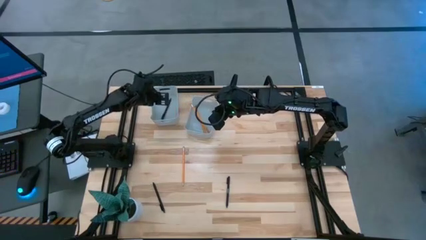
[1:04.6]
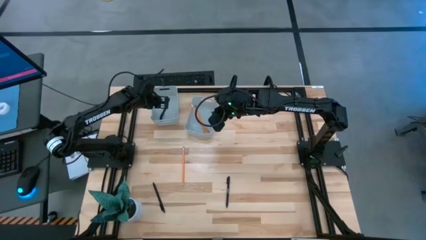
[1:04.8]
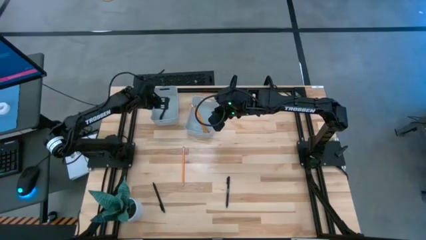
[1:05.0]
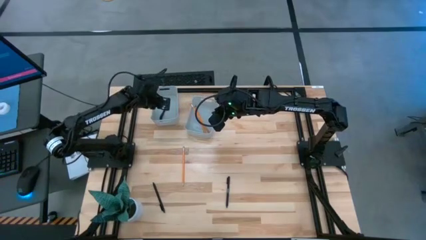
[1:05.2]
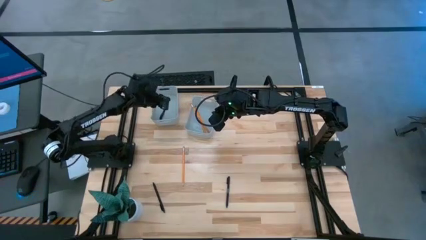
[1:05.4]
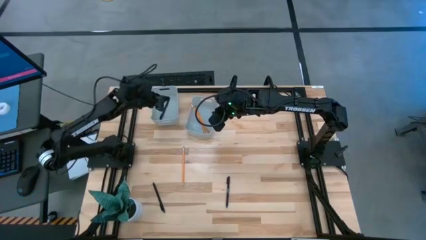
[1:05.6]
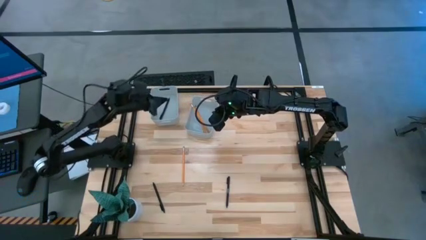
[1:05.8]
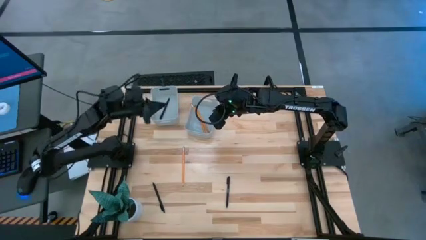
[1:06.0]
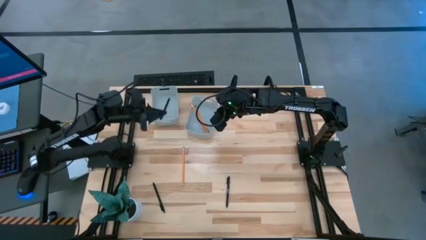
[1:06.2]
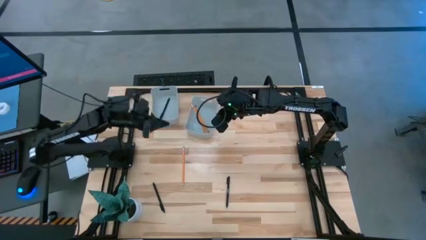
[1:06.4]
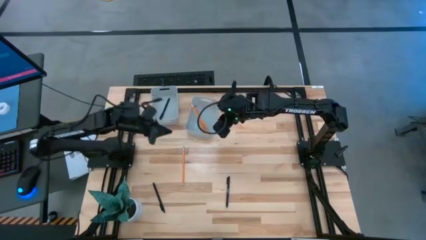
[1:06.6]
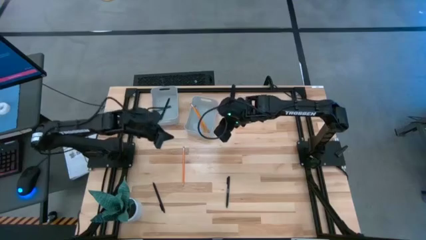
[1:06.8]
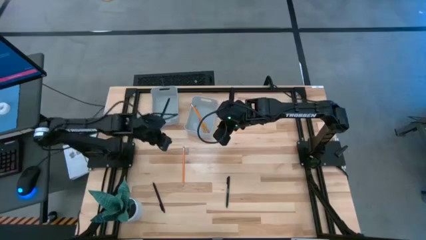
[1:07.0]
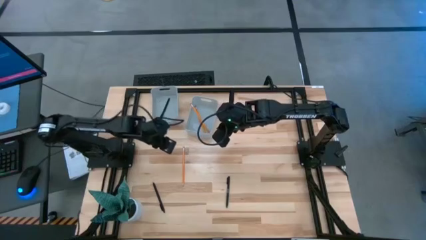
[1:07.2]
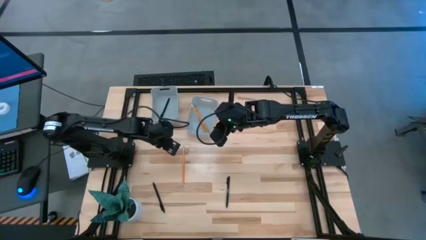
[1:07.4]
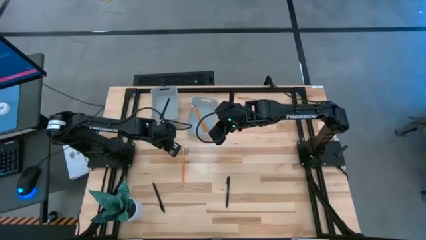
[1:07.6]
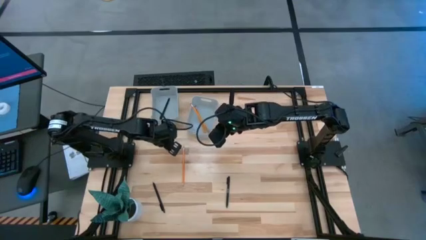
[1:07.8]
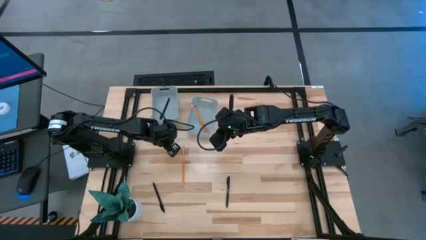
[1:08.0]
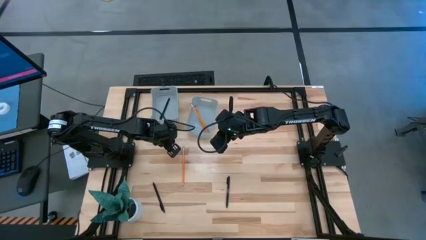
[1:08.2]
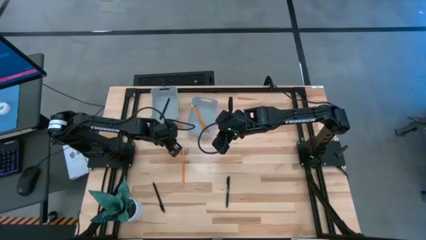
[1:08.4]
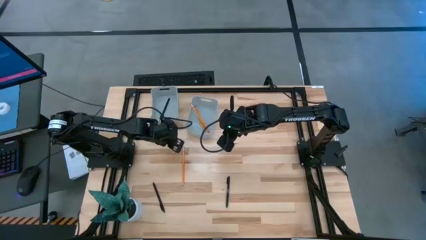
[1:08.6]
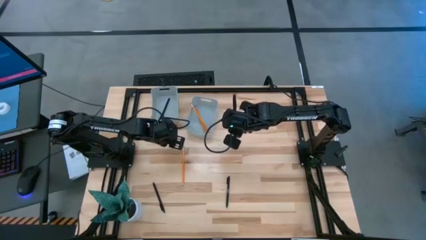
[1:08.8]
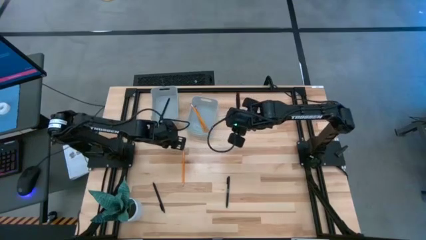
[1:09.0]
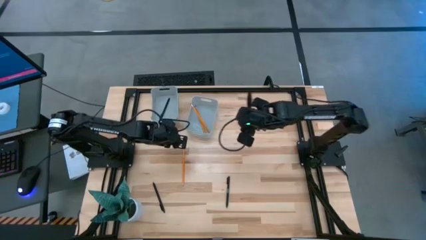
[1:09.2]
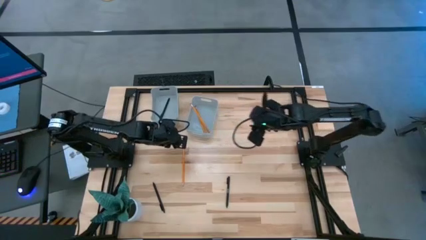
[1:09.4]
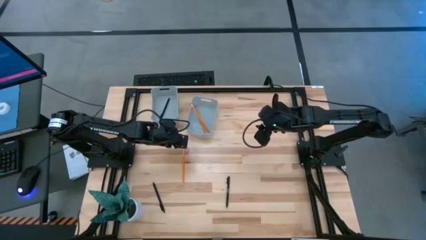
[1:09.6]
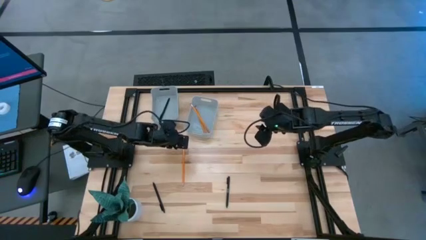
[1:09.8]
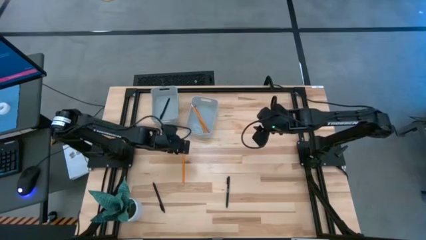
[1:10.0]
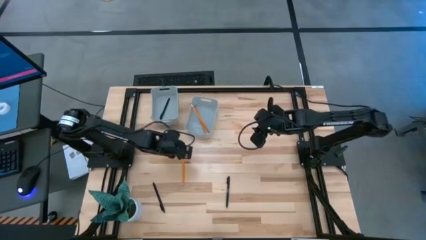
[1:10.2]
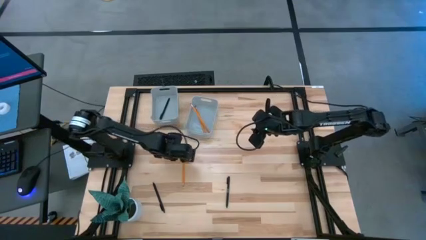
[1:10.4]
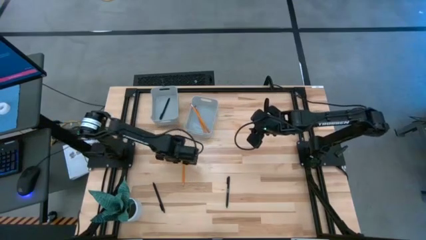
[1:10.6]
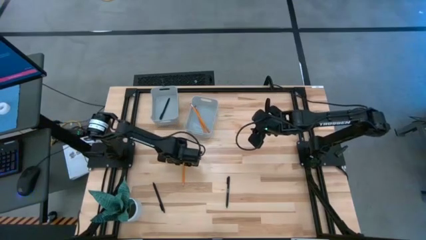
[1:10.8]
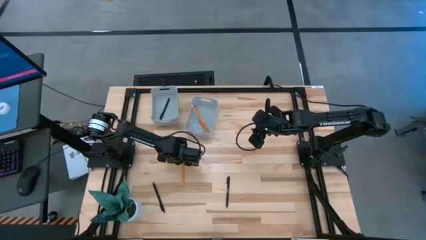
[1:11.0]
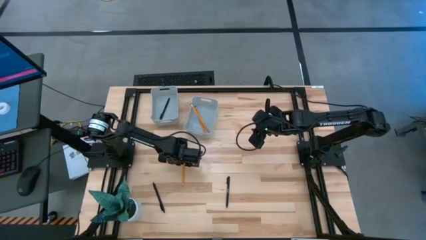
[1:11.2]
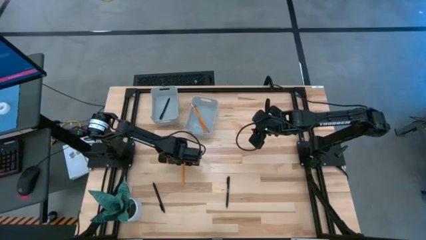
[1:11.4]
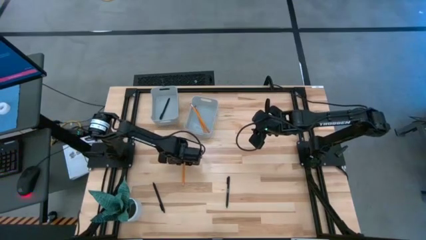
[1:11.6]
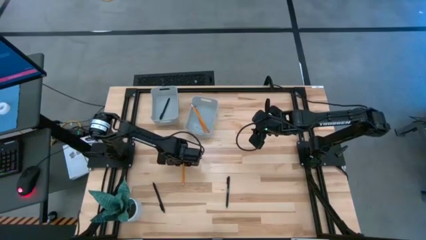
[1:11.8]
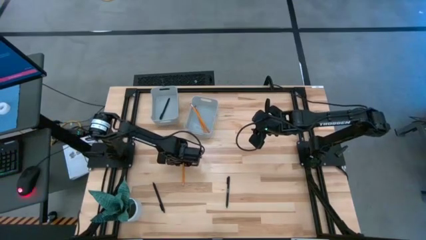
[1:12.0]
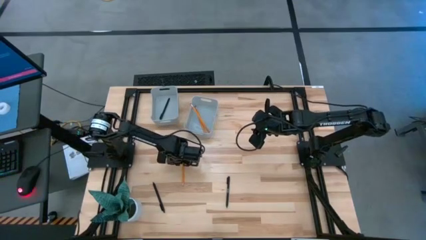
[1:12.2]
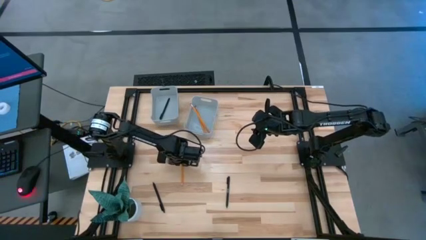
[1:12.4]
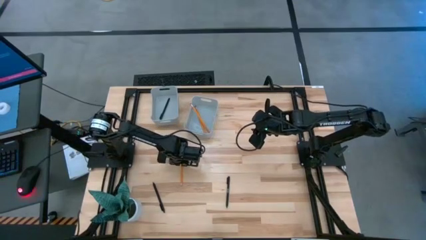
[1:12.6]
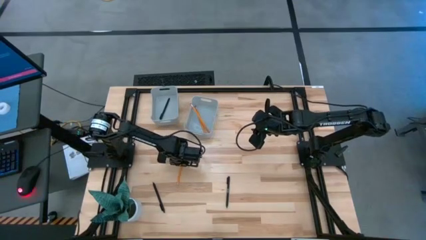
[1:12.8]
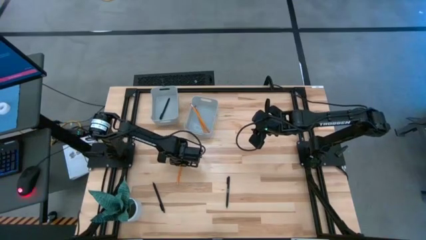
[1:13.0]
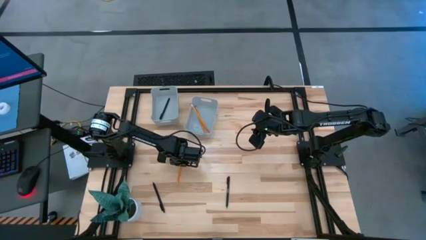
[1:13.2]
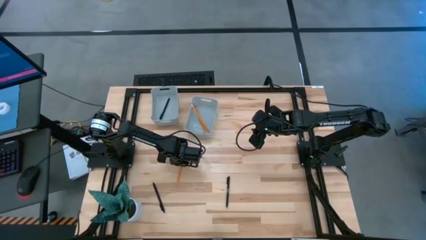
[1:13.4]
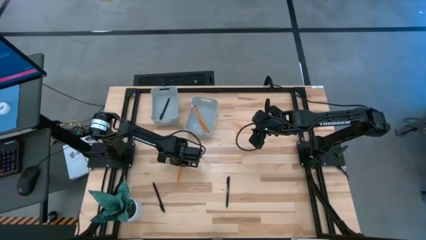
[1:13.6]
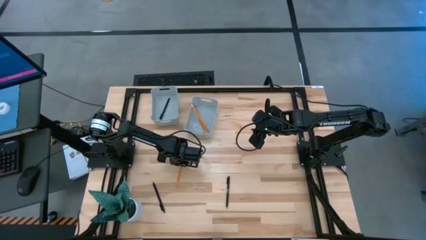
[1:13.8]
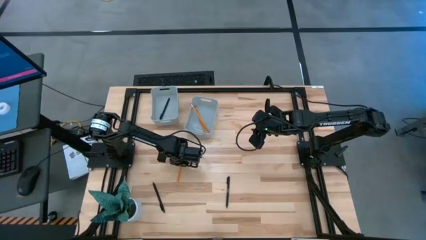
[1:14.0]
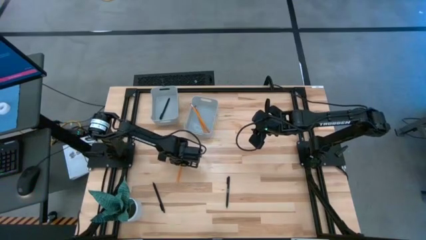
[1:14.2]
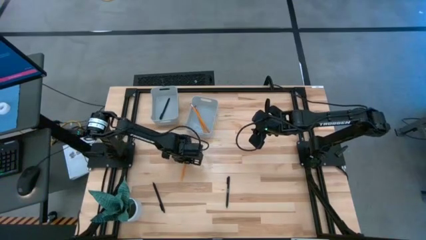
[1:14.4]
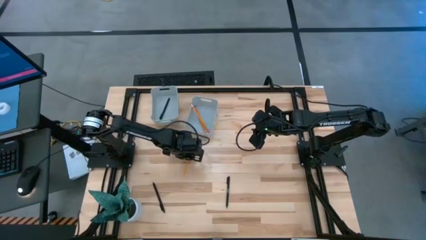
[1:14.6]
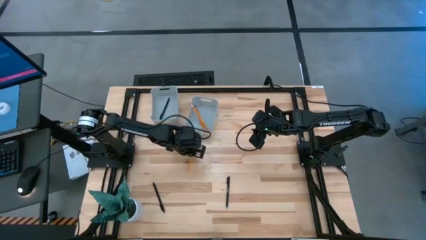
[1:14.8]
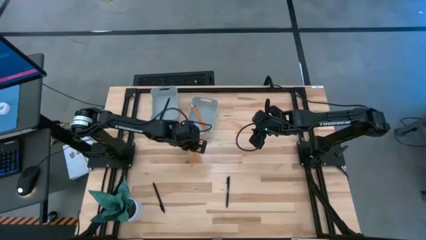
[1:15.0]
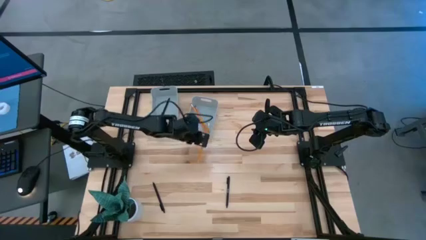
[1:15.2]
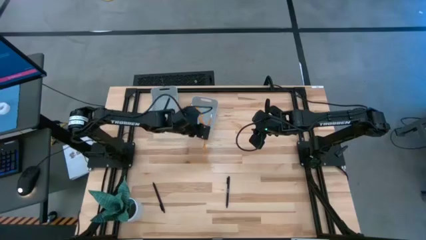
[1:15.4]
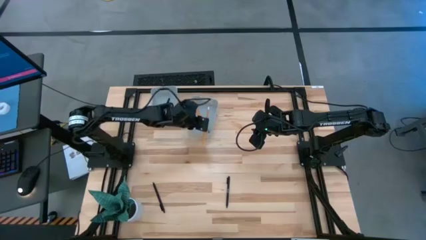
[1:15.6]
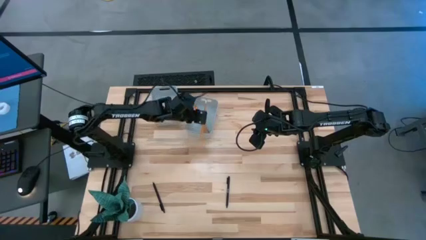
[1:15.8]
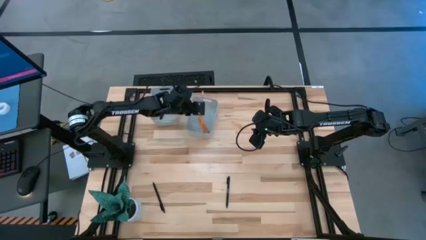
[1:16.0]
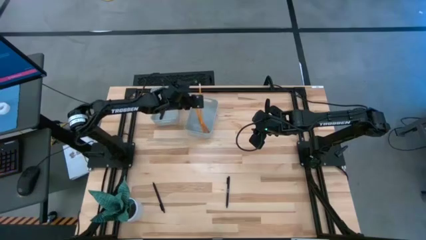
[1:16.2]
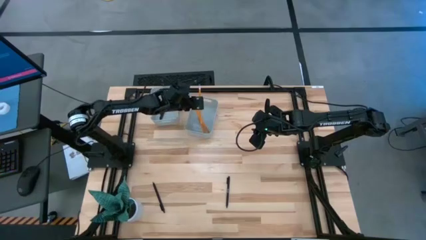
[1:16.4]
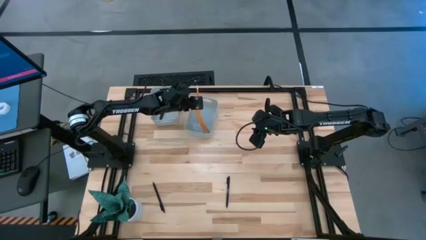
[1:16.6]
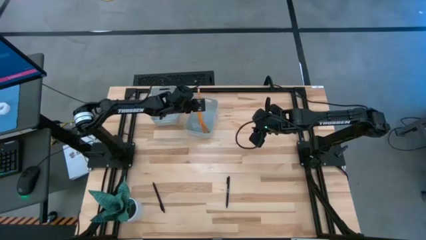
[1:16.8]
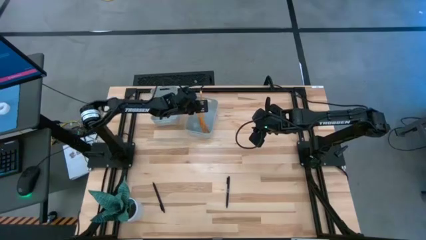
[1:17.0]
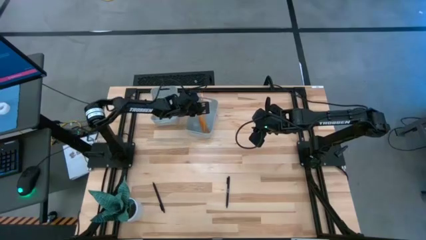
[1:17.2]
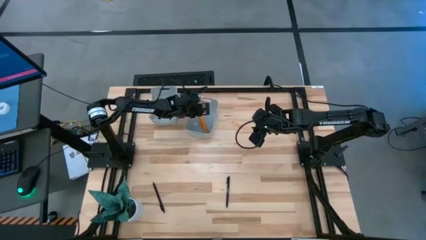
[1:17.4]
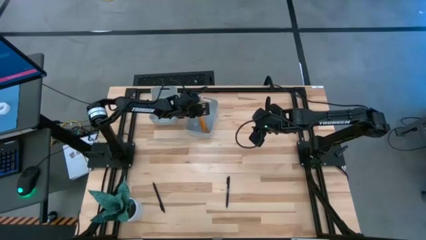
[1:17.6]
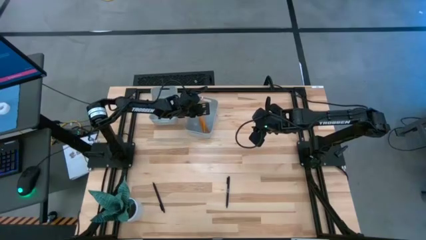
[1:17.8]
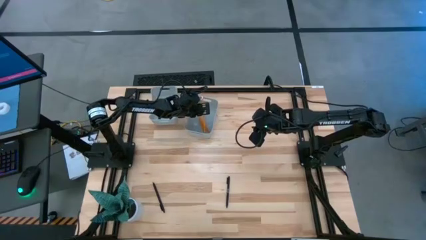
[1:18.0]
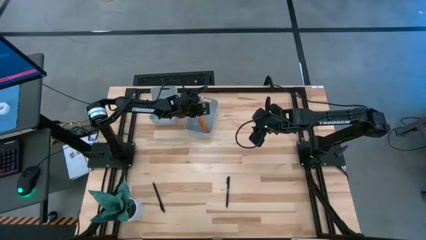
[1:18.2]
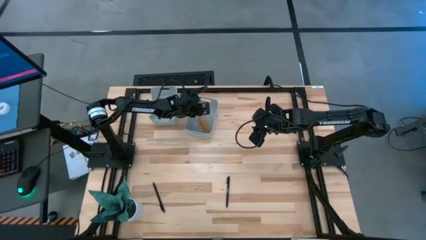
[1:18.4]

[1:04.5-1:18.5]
Task: Sort pens & pencils
Put the orange pencil into the right gray bin
